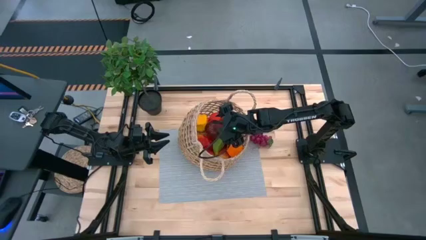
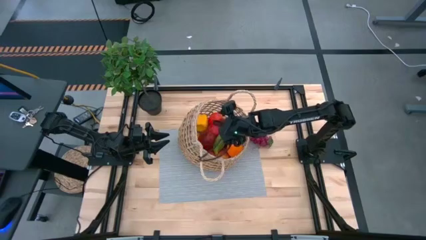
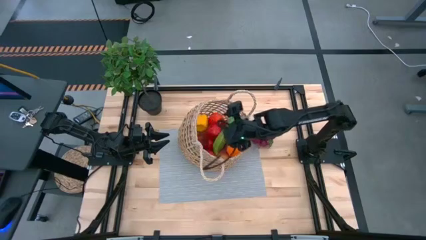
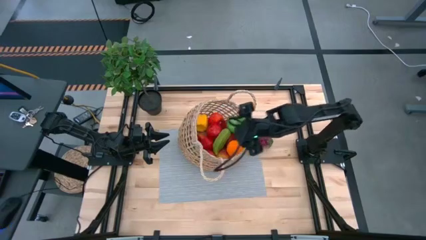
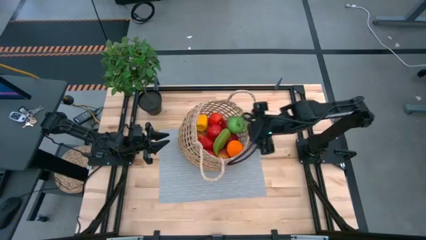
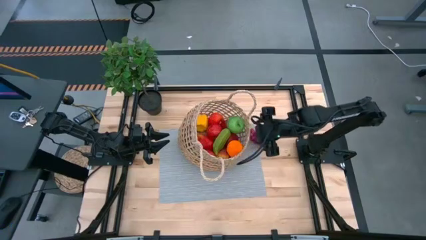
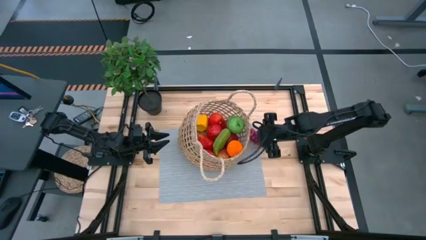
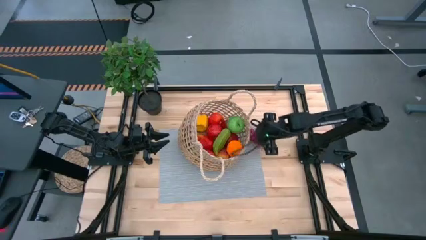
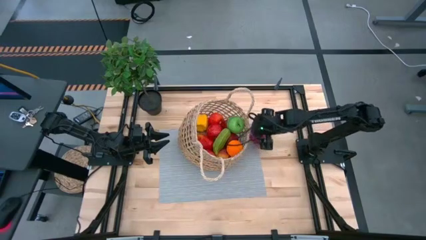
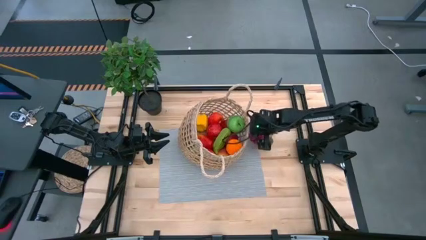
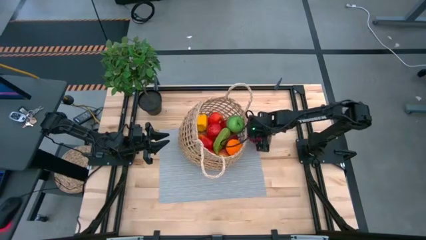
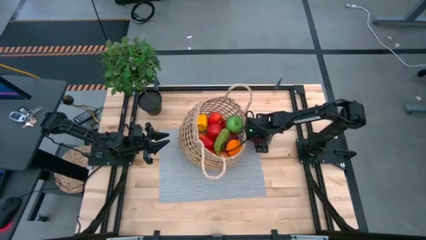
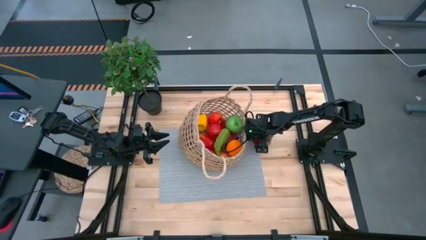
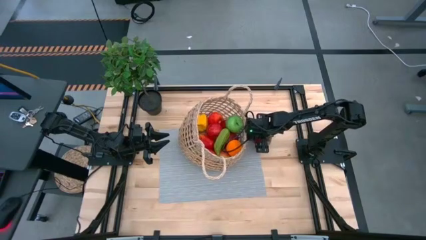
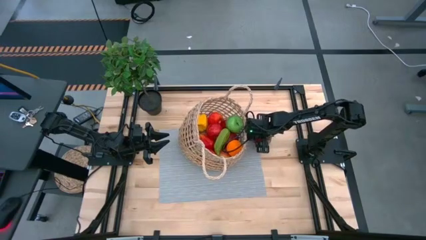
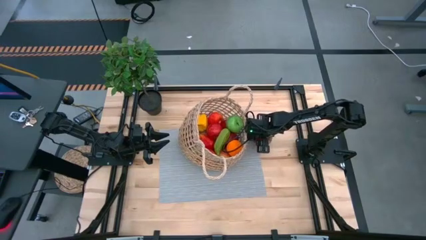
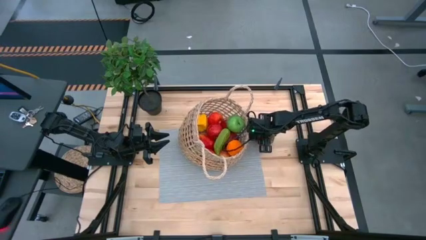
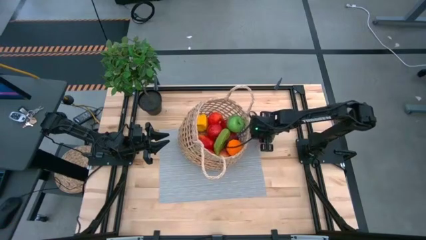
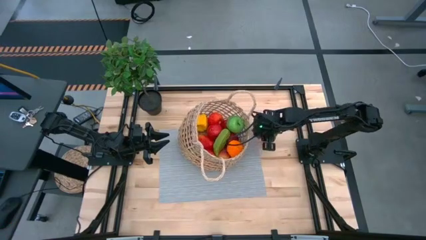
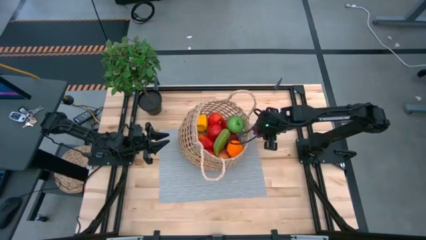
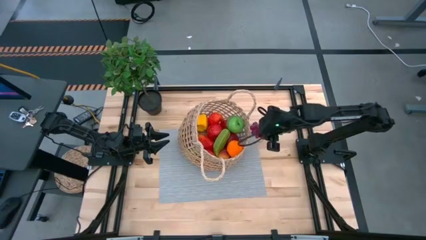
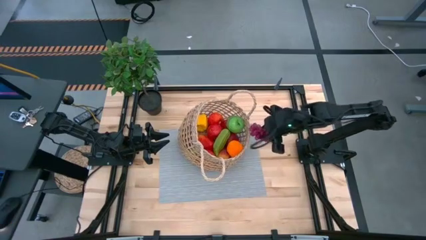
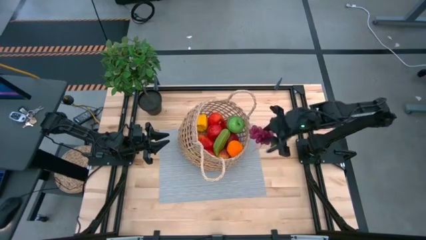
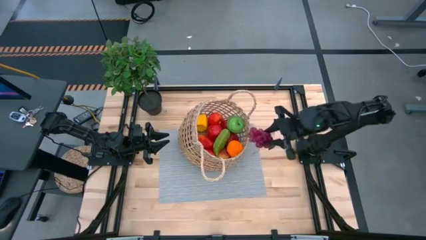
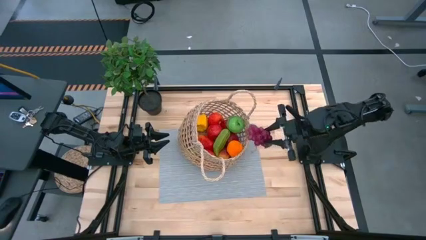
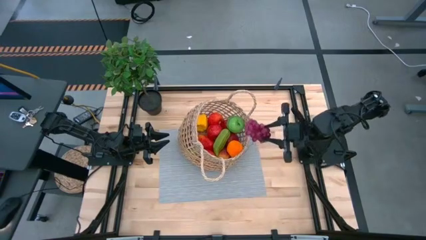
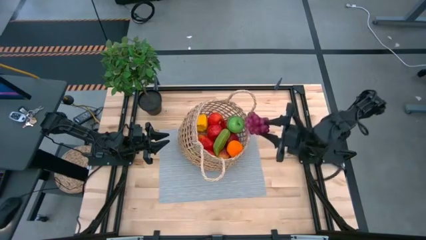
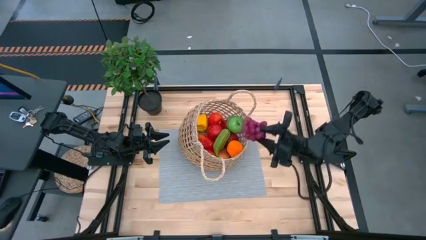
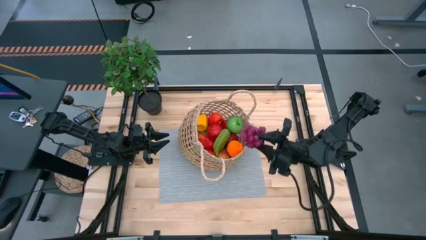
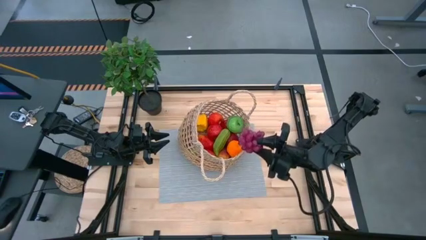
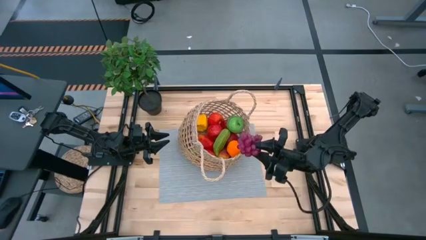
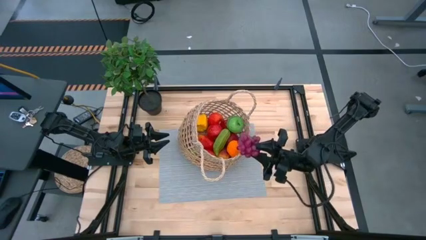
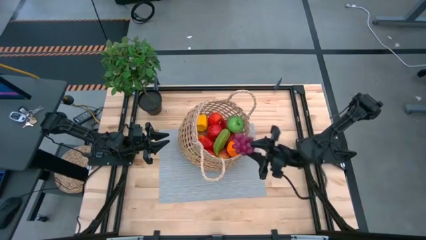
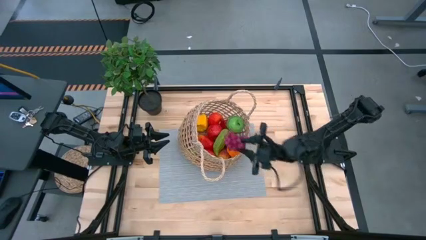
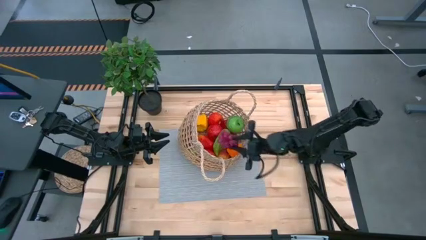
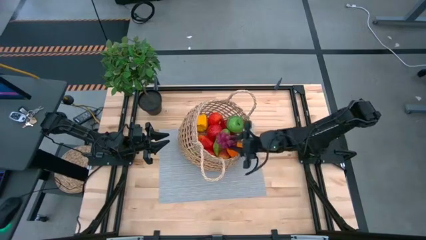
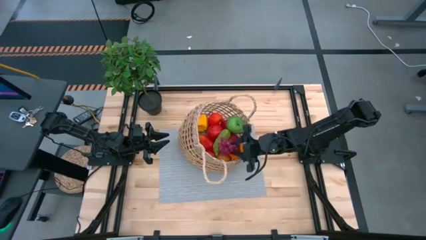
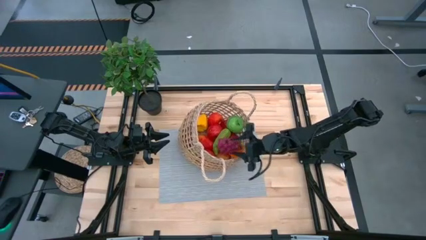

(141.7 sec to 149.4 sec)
Task: Build produce basket
Put the red grapes into the brown basket

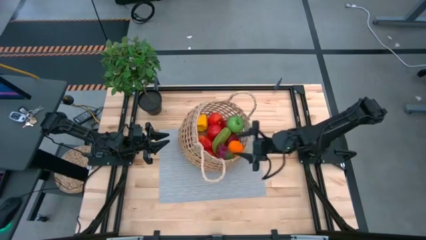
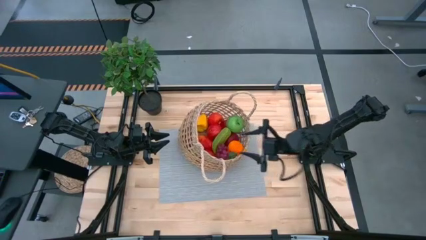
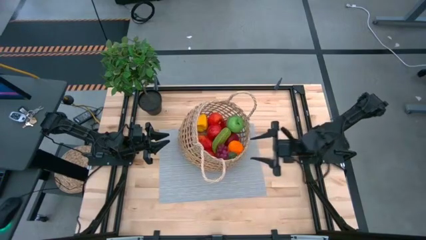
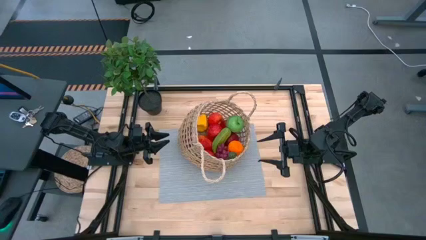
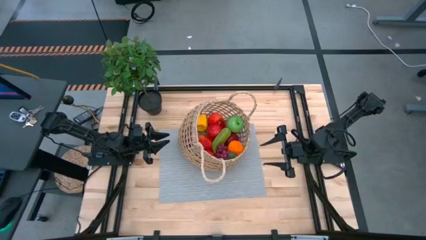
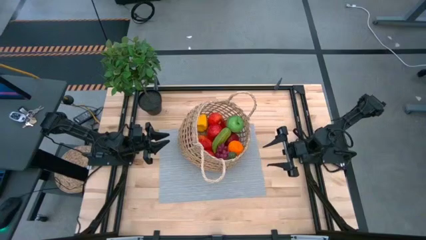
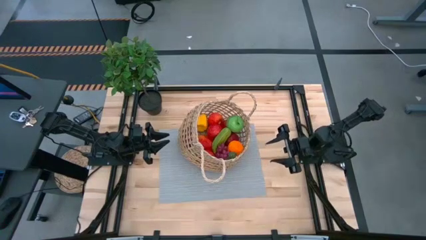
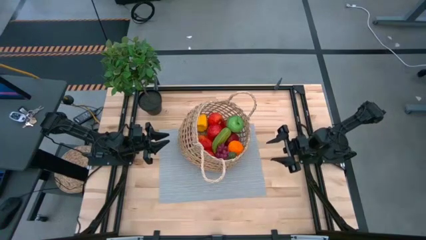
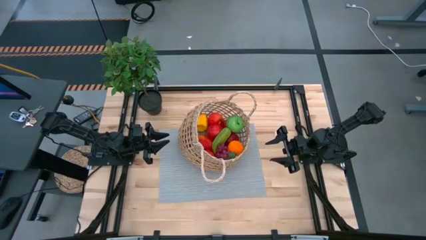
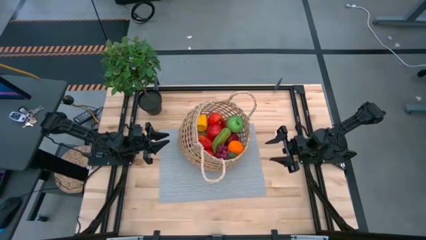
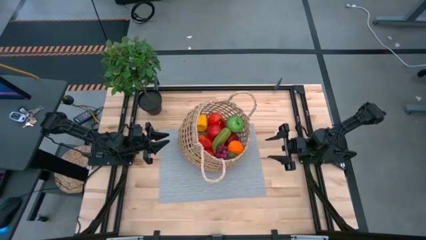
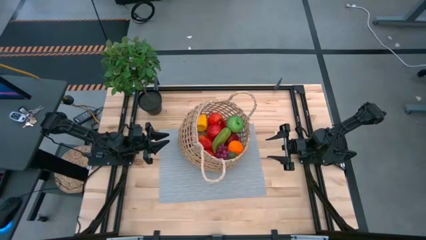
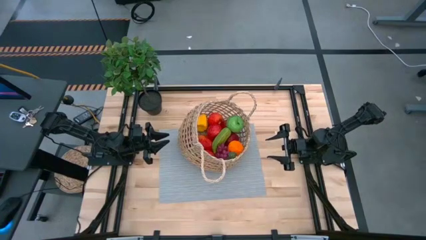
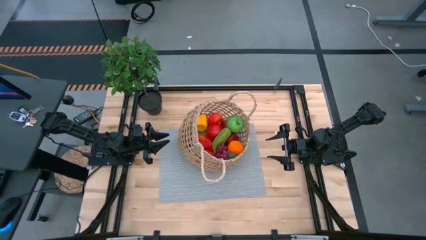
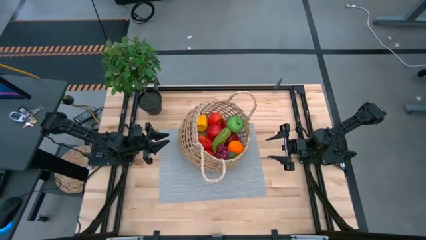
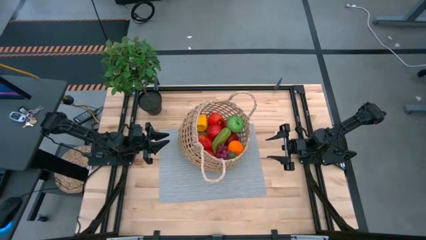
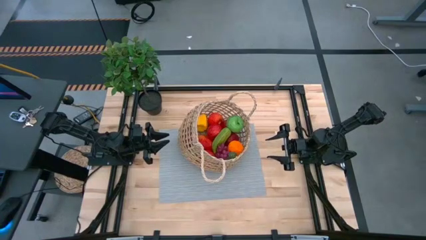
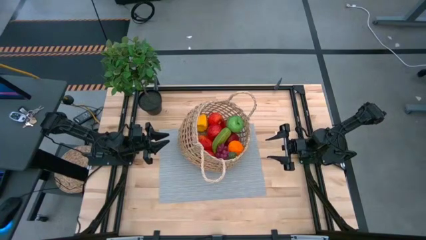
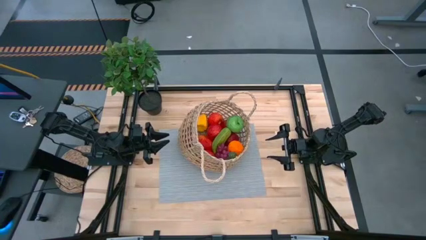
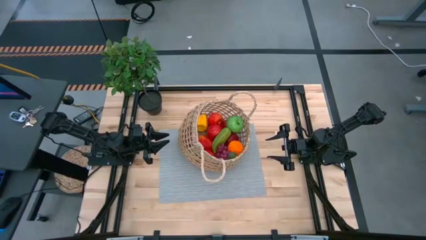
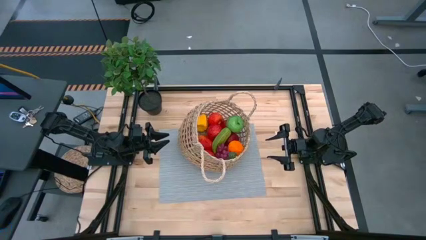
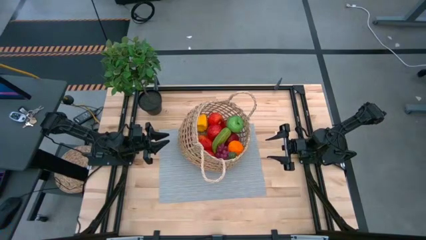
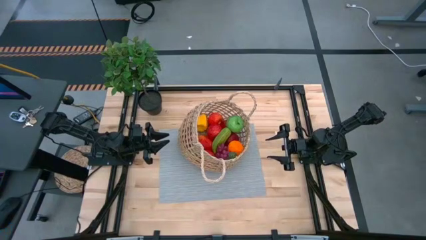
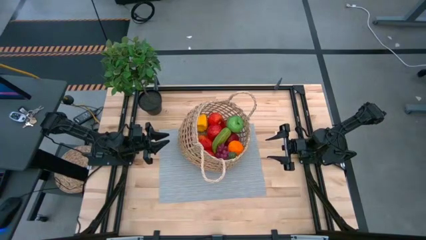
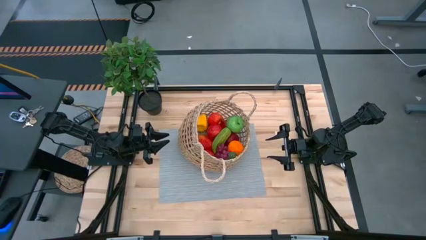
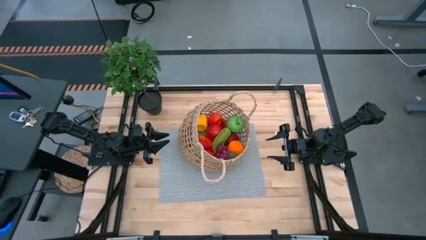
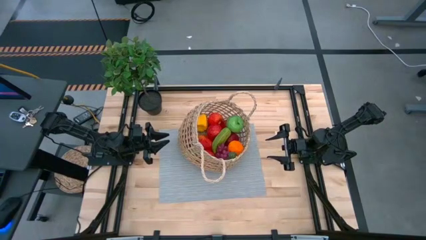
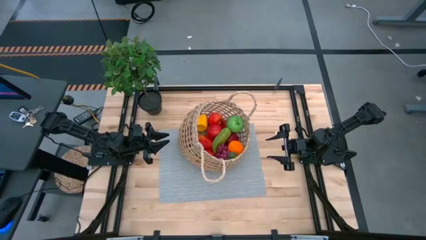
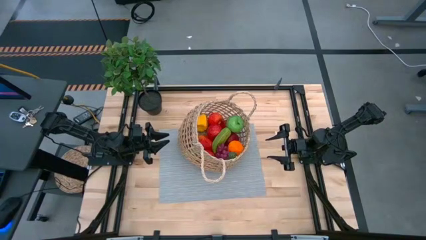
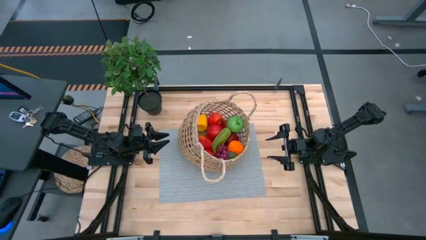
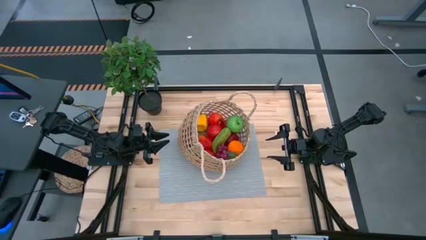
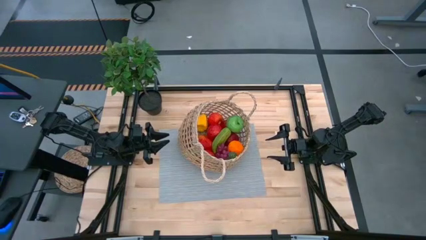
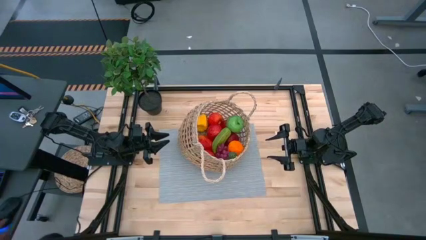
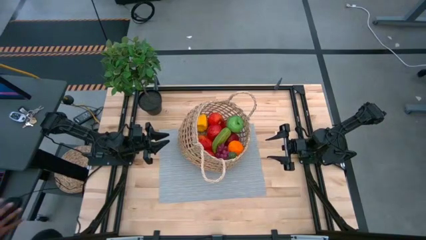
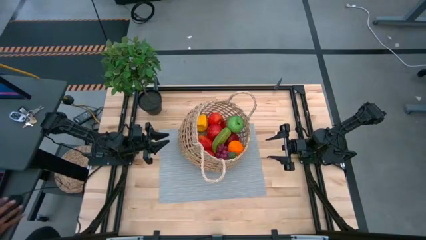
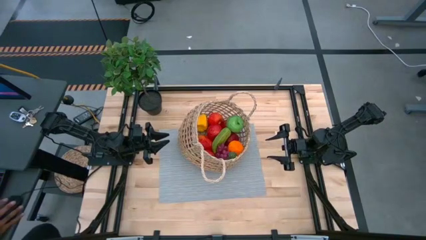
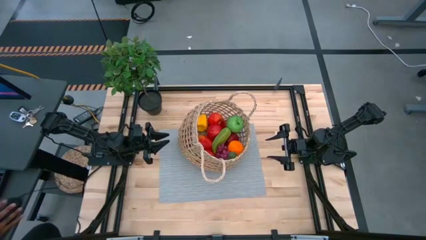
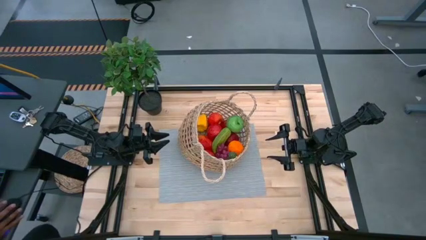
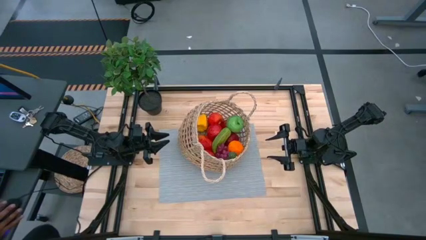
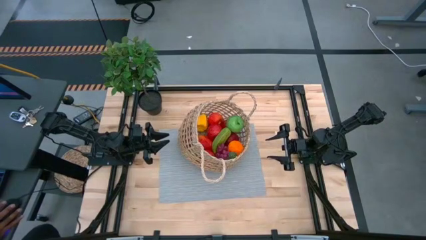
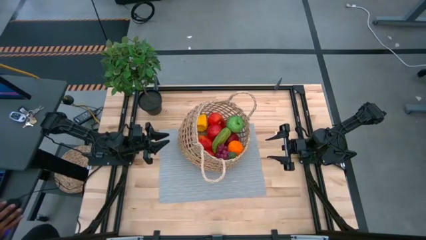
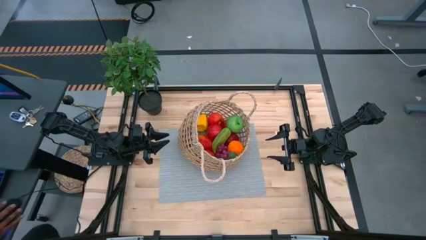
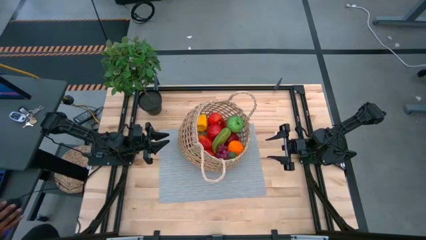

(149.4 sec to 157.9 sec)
Return to Home Position
